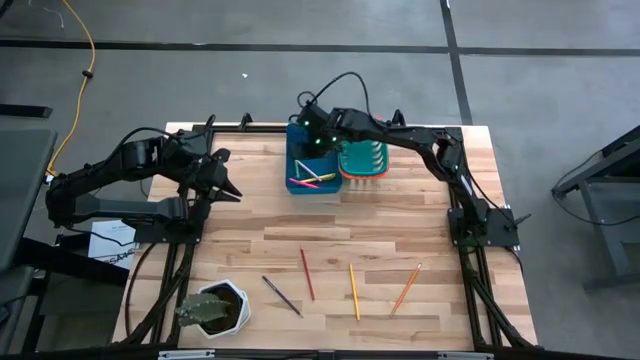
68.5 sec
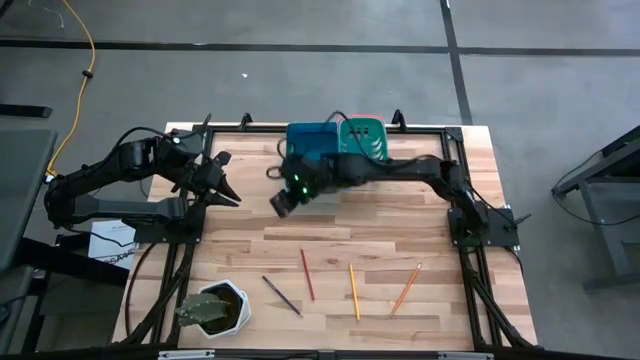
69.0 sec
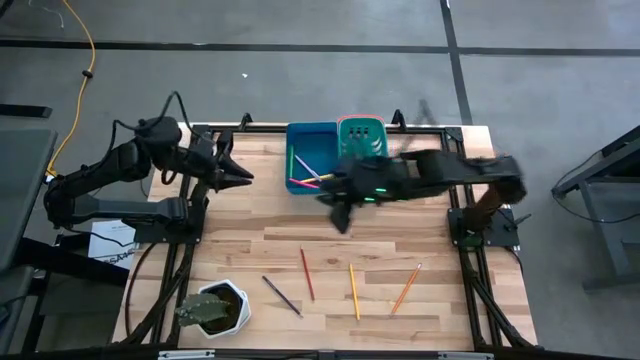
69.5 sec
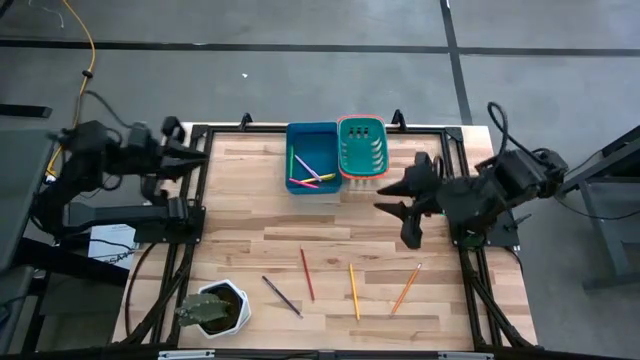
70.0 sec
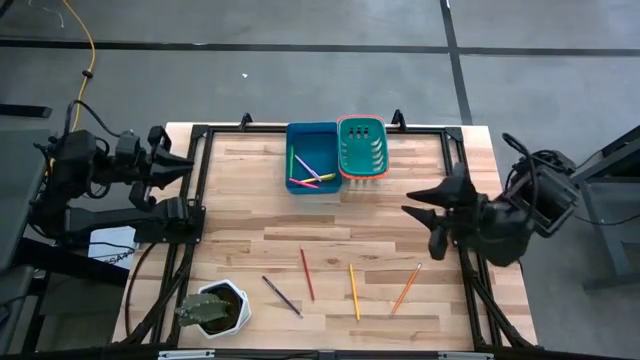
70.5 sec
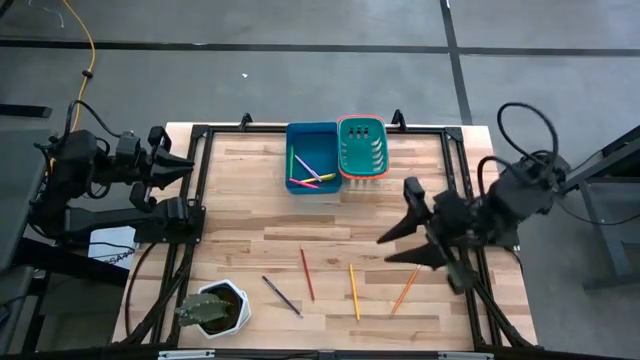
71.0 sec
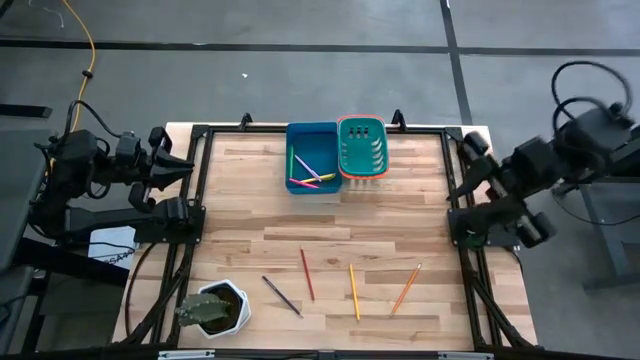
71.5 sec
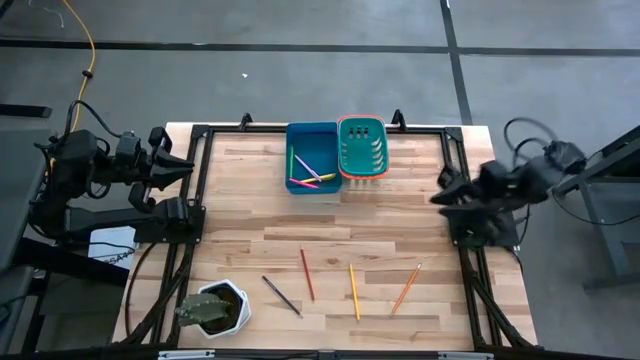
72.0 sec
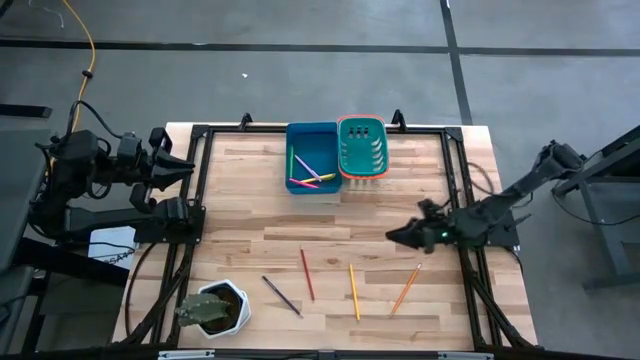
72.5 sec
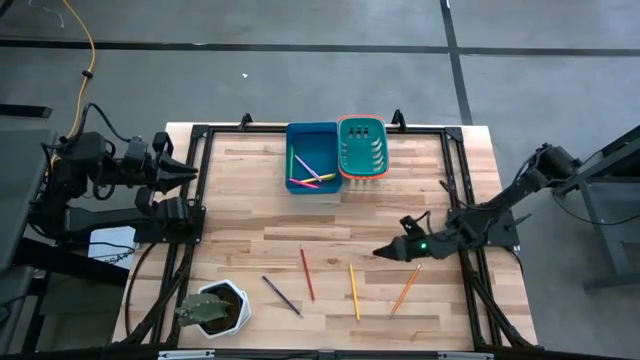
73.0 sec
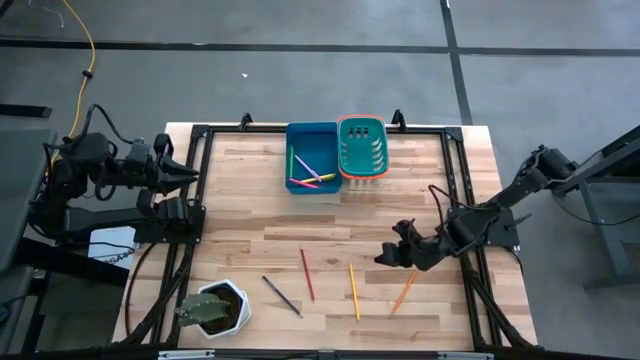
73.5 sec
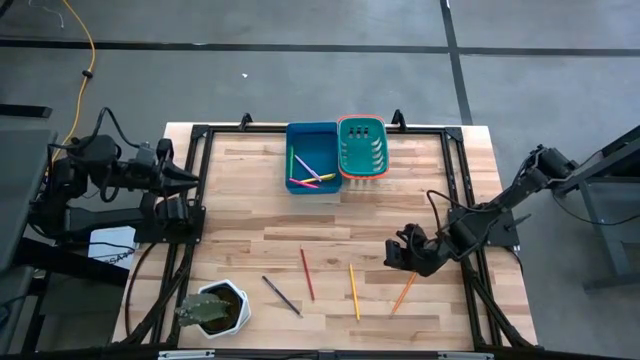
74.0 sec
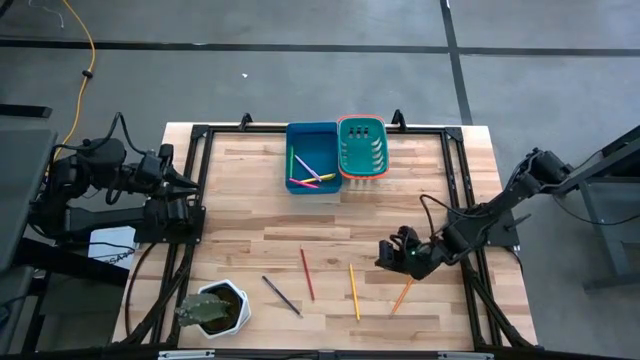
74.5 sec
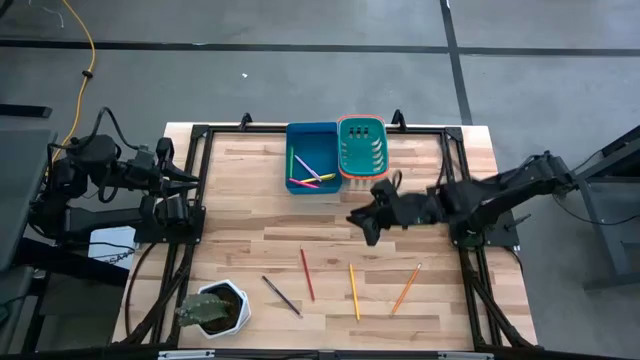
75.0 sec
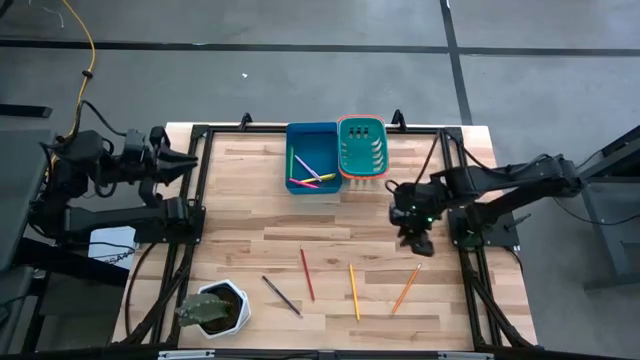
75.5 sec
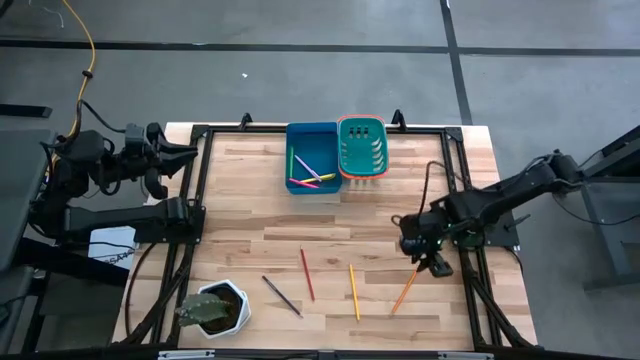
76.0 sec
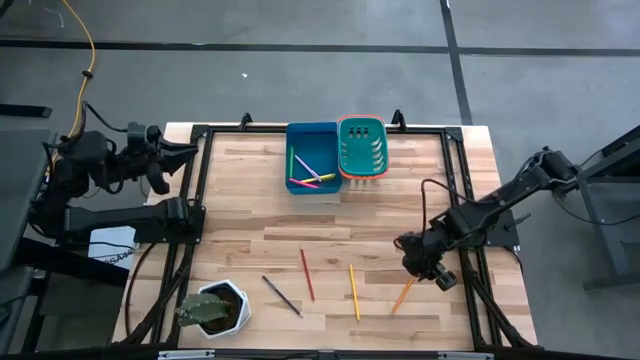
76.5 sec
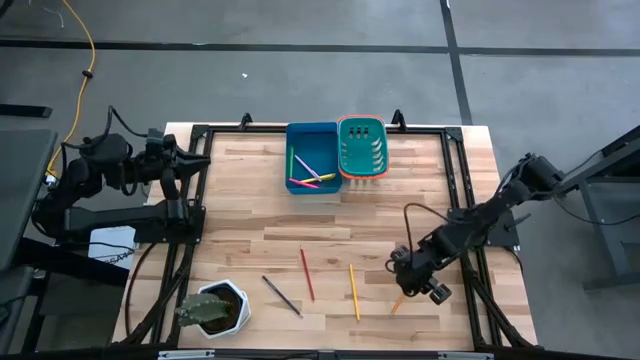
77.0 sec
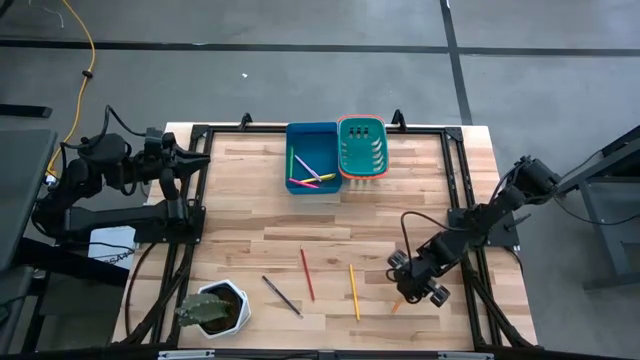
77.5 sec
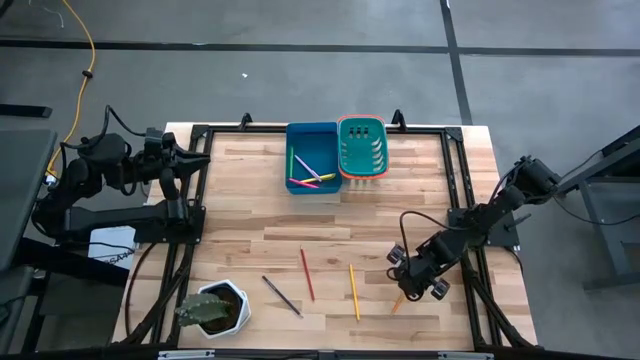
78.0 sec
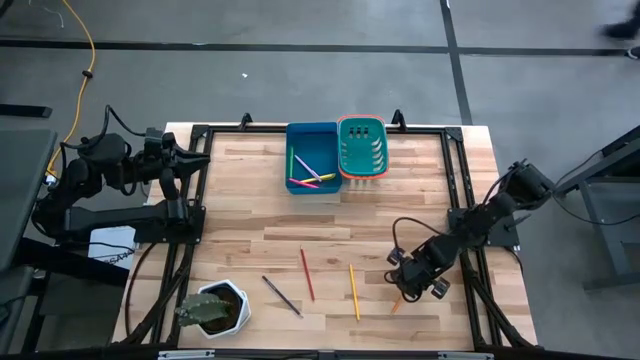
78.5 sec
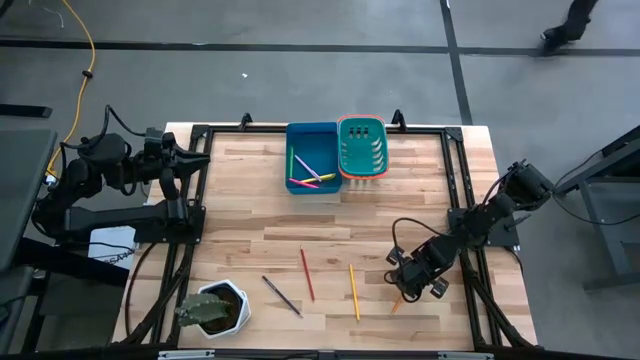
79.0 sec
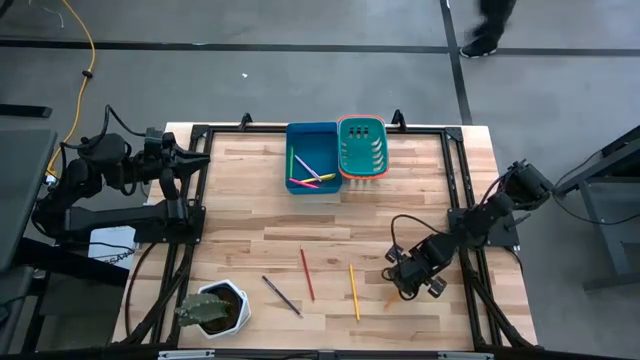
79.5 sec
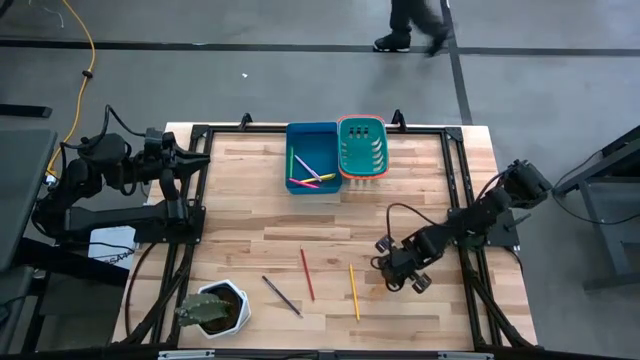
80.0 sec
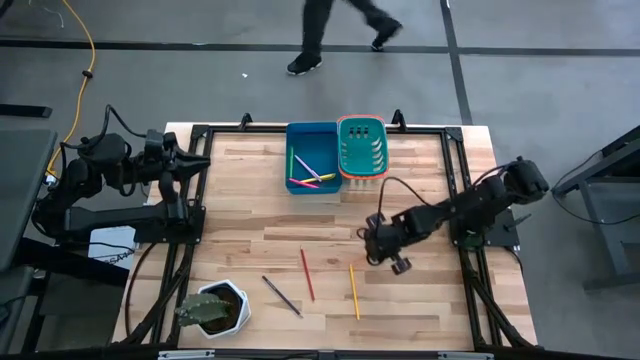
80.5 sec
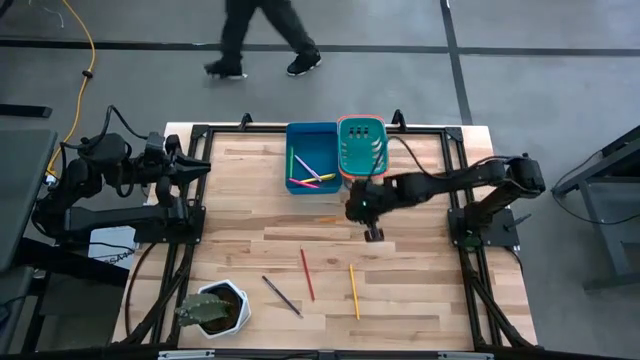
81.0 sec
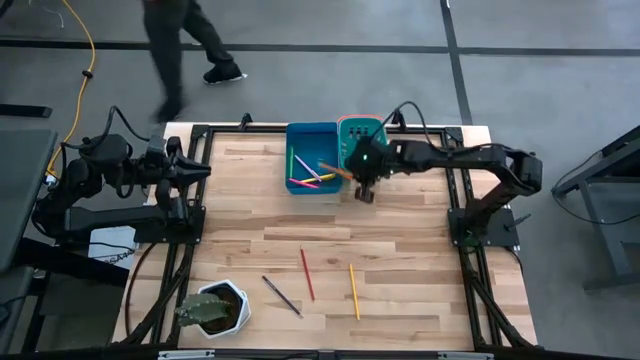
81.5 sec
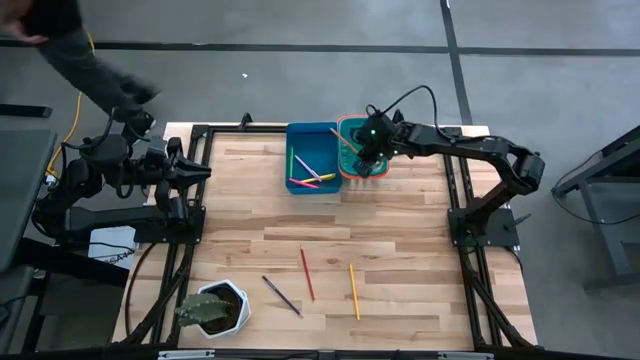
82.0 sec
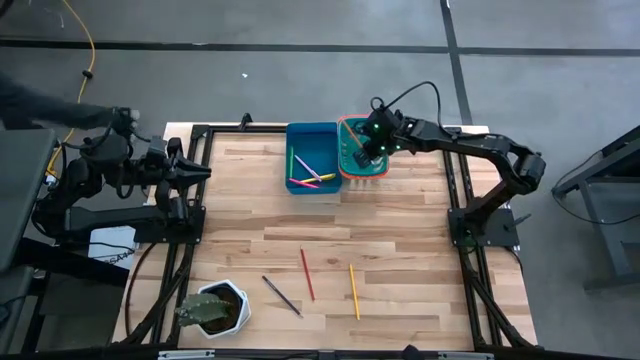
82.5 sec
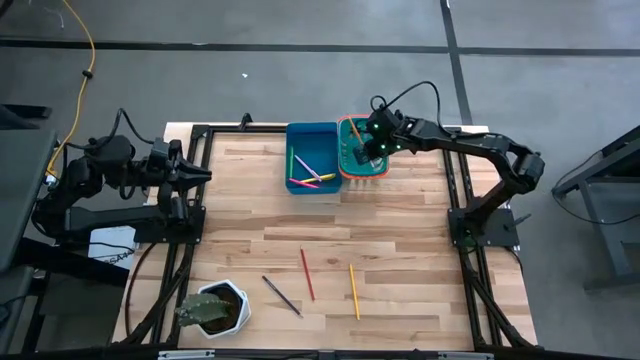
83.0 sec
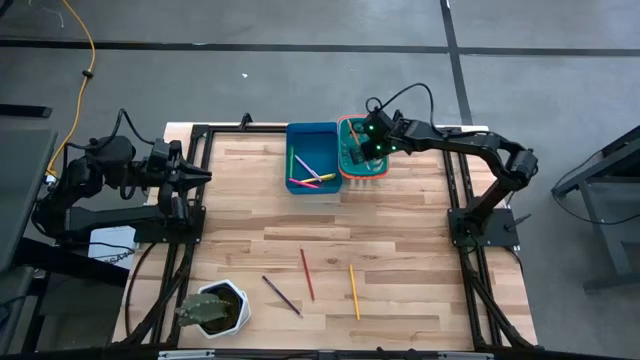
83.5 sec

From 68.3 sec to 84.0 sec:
Task: Sort pens & pencils
Put the orange pencil into the green bin

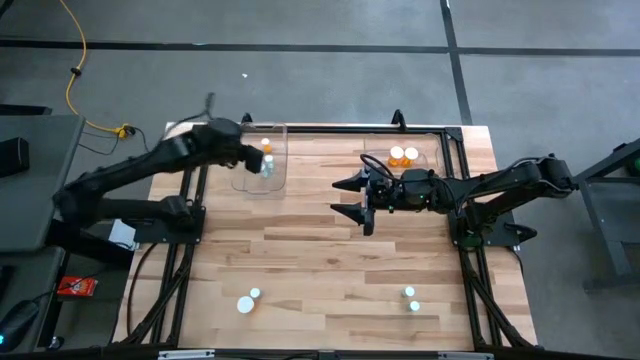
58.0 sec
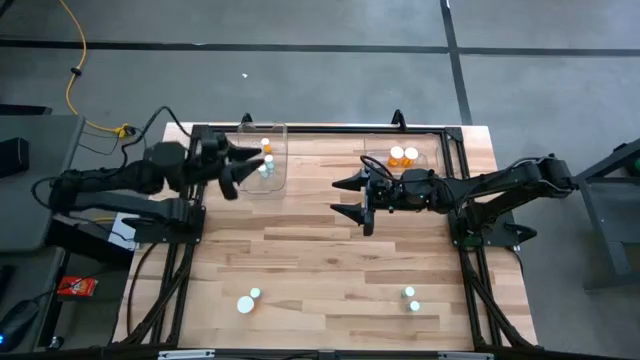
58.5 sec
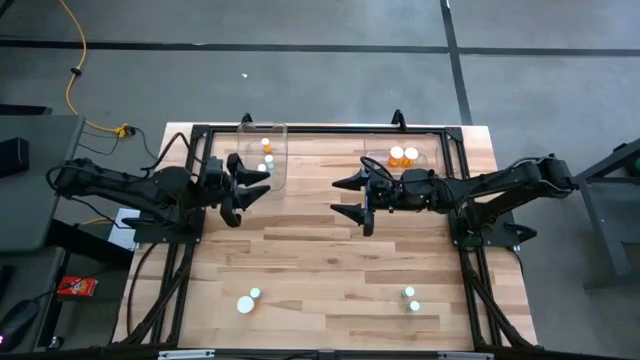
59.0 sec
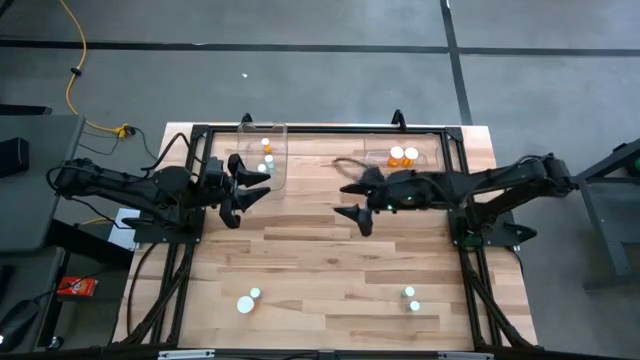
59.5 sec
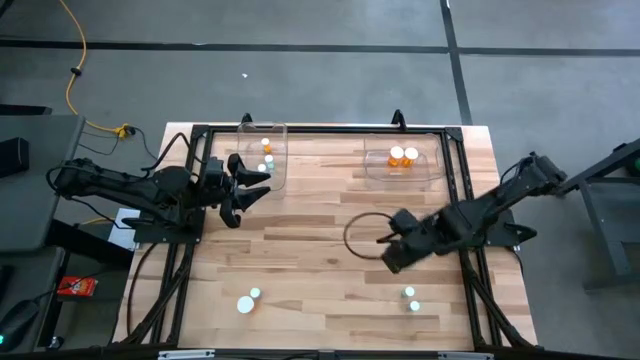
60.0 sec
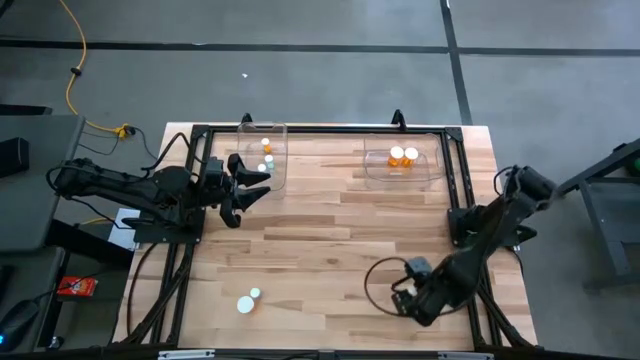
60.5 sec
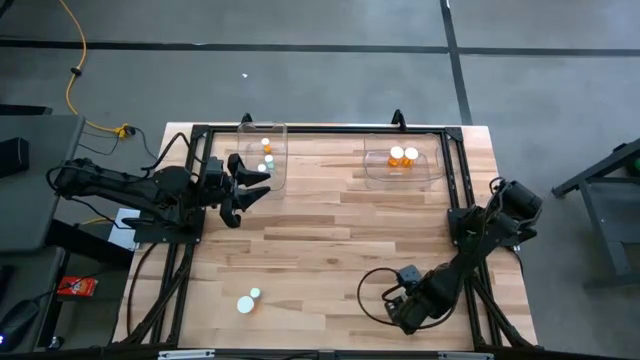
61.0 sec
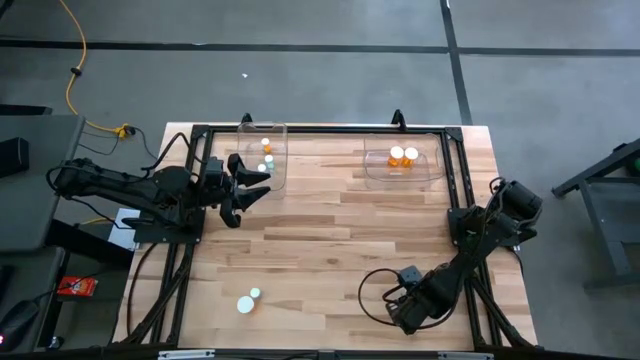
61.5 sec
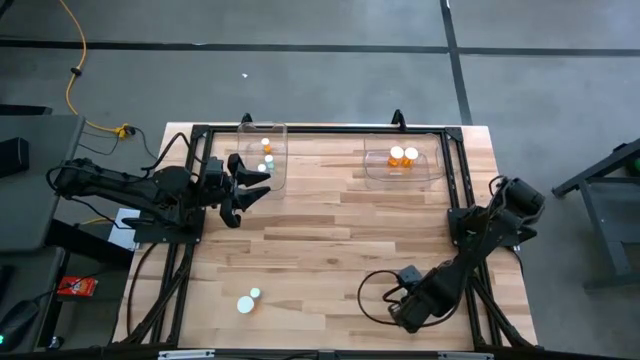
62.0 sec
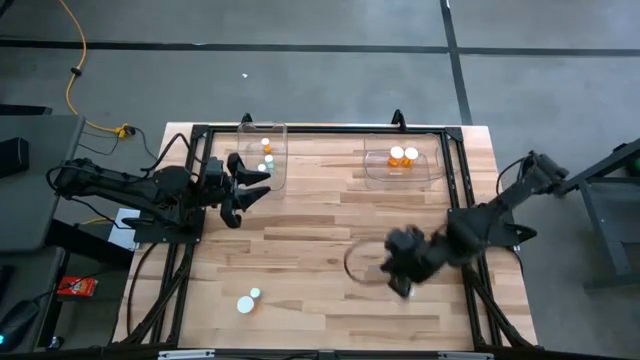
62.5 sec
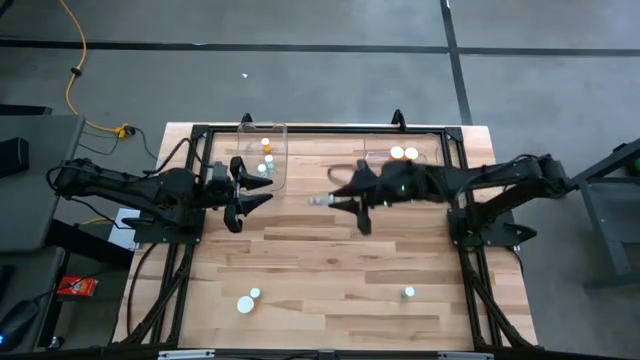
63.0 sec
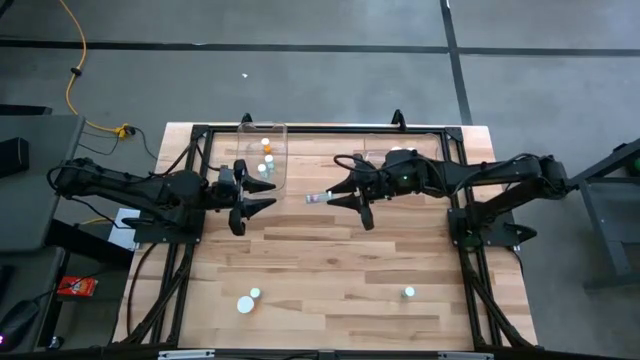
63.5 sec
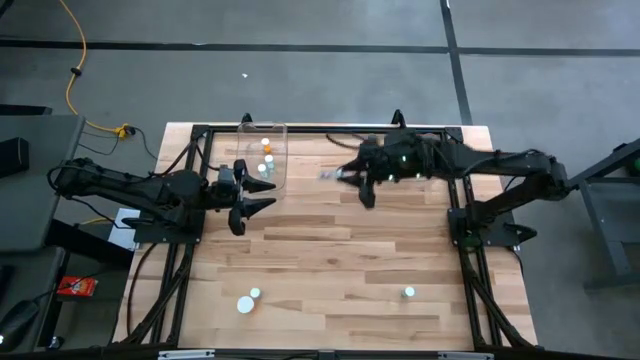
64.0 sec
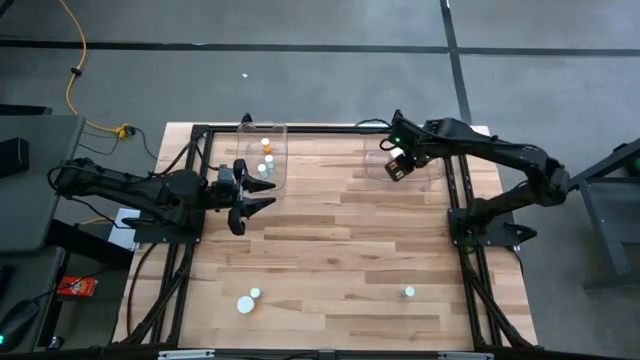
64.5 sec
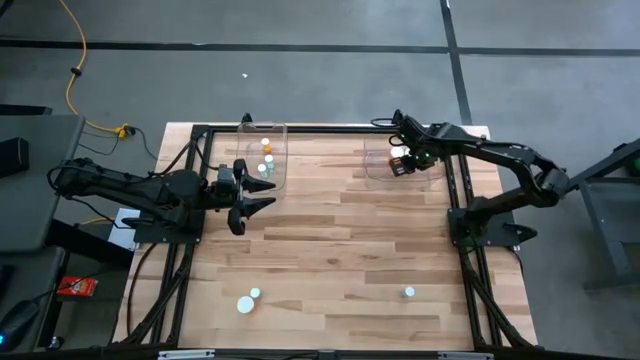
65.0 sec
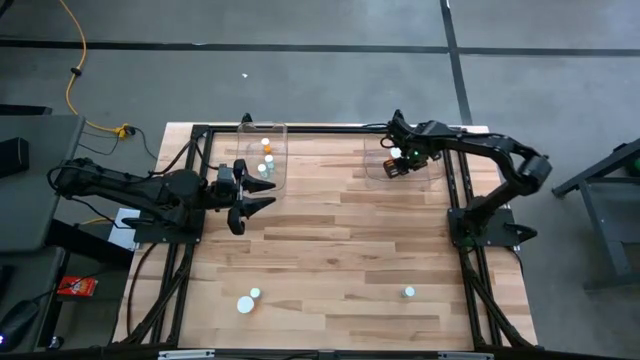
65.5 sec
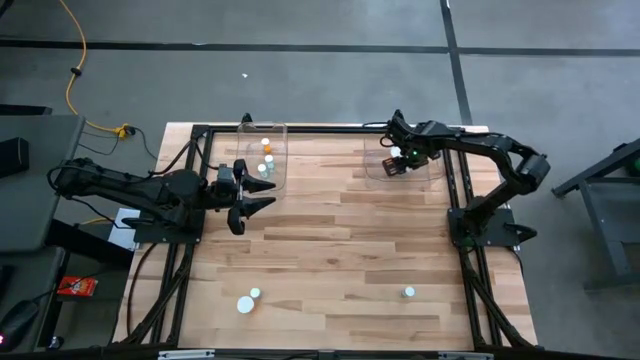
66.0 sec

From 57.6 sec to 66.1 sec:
Task: Pick and place medicine bottles into bin by pill shape (circle, oval)
Put the transparent pill bottle into the right transparent bin
